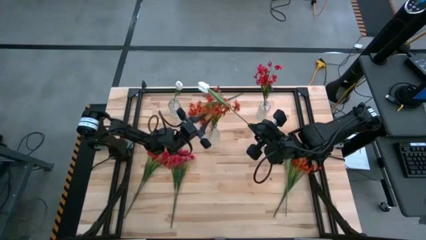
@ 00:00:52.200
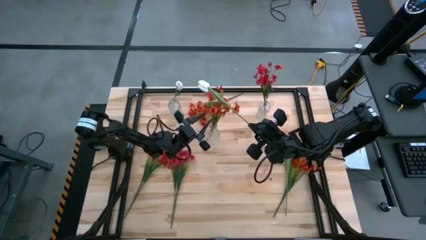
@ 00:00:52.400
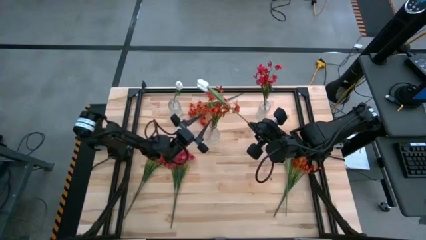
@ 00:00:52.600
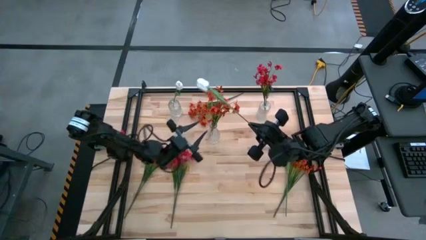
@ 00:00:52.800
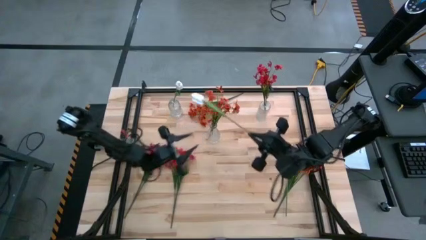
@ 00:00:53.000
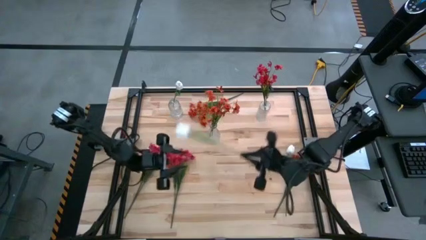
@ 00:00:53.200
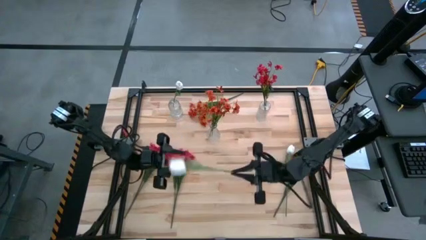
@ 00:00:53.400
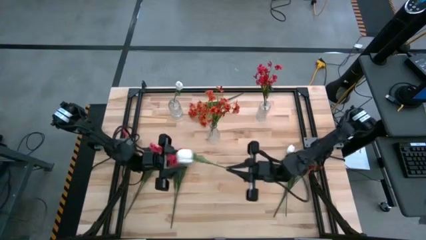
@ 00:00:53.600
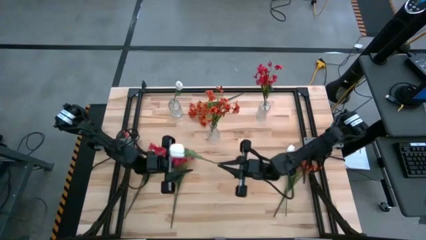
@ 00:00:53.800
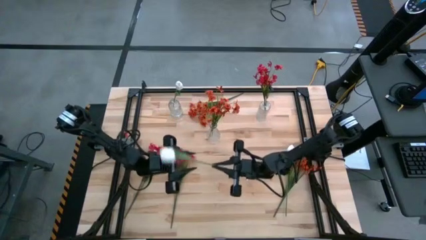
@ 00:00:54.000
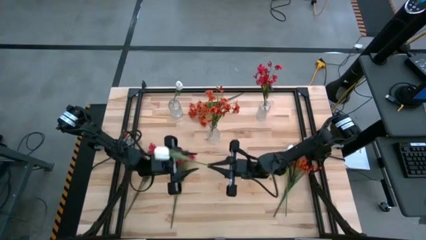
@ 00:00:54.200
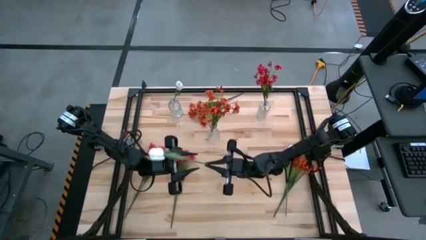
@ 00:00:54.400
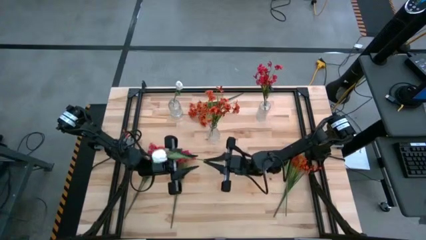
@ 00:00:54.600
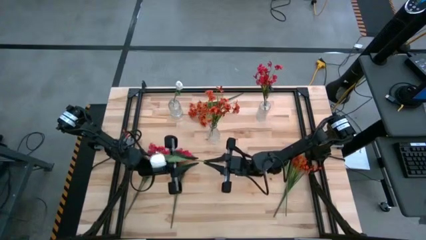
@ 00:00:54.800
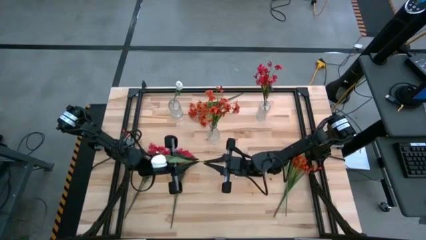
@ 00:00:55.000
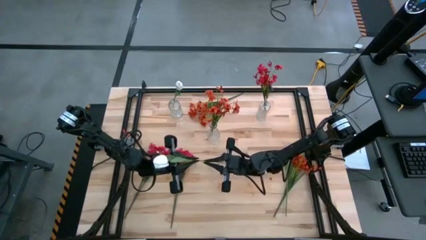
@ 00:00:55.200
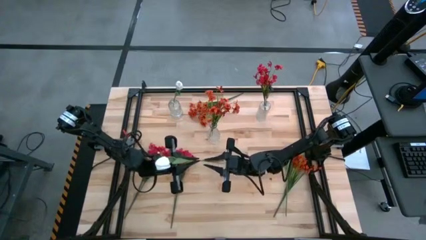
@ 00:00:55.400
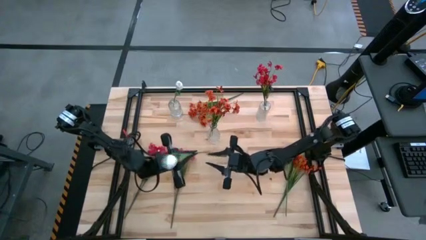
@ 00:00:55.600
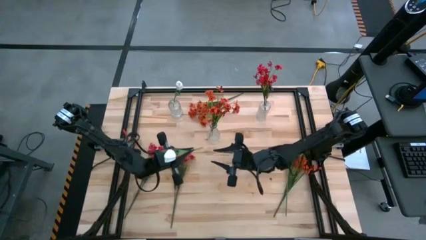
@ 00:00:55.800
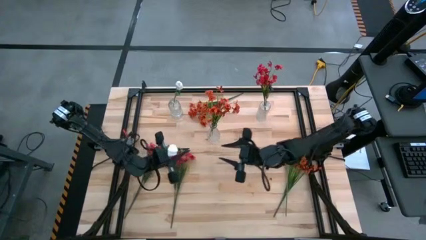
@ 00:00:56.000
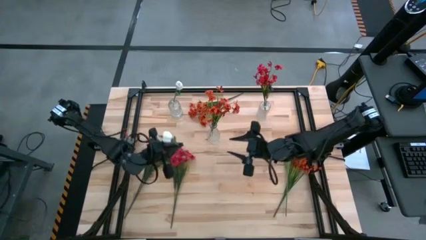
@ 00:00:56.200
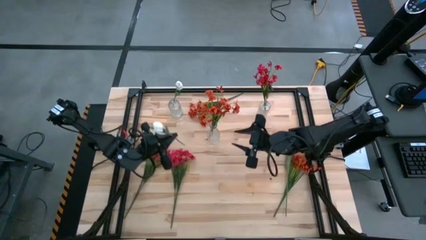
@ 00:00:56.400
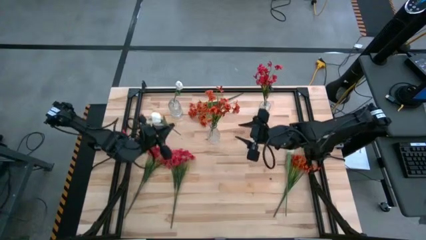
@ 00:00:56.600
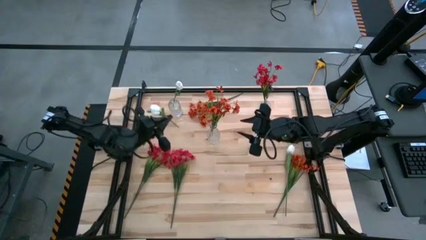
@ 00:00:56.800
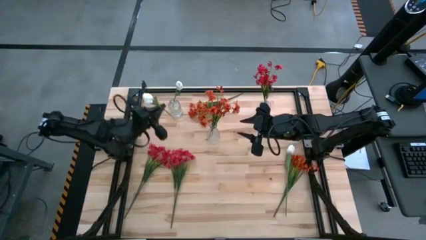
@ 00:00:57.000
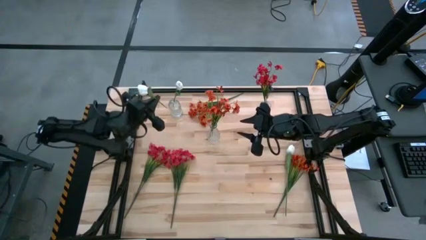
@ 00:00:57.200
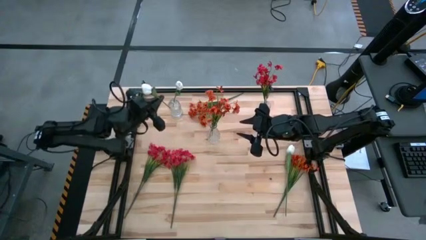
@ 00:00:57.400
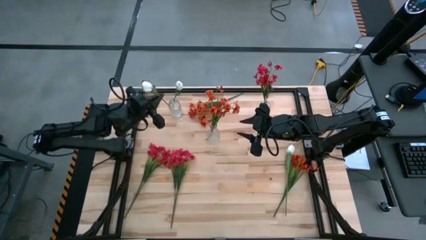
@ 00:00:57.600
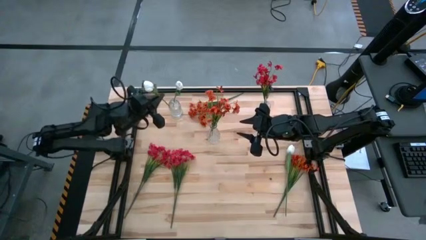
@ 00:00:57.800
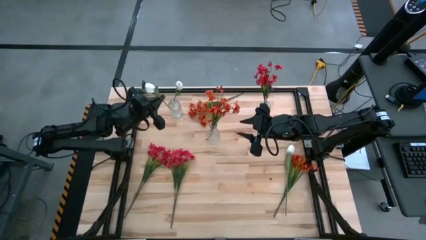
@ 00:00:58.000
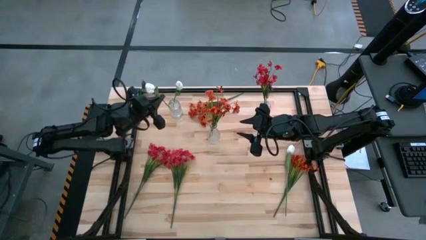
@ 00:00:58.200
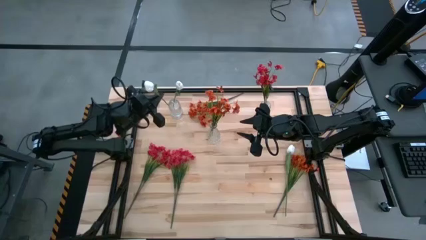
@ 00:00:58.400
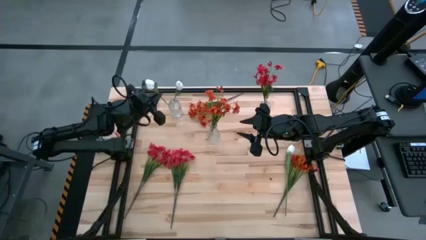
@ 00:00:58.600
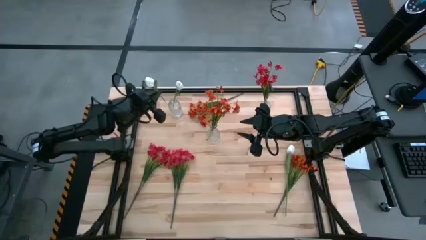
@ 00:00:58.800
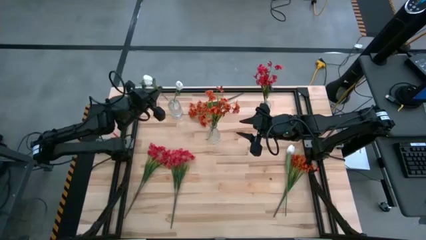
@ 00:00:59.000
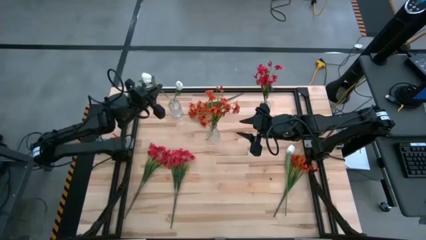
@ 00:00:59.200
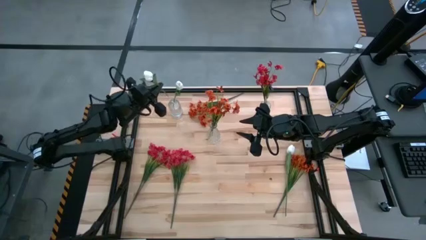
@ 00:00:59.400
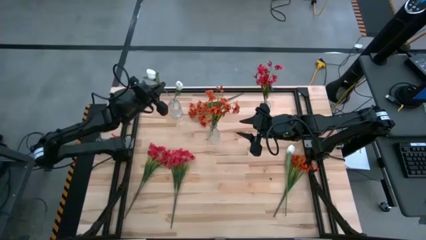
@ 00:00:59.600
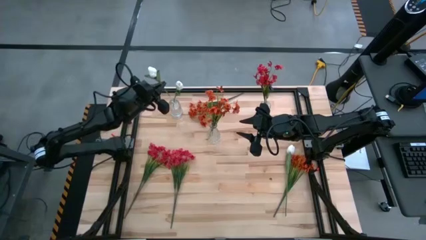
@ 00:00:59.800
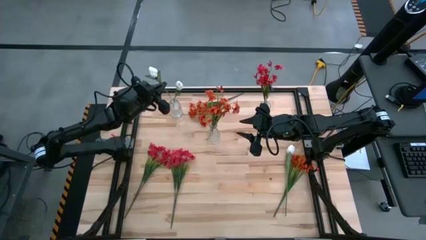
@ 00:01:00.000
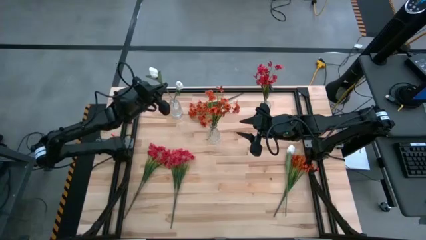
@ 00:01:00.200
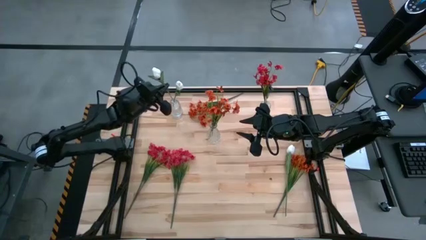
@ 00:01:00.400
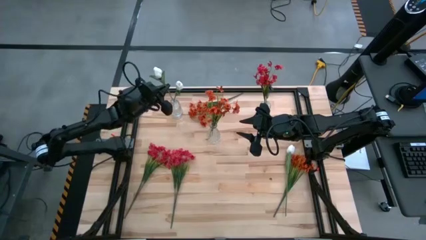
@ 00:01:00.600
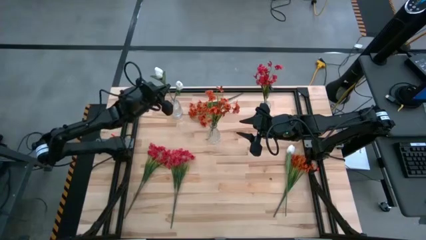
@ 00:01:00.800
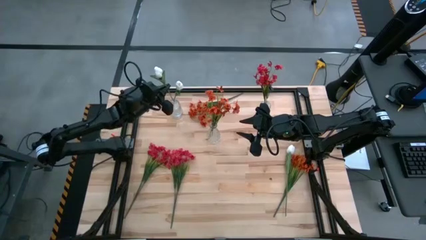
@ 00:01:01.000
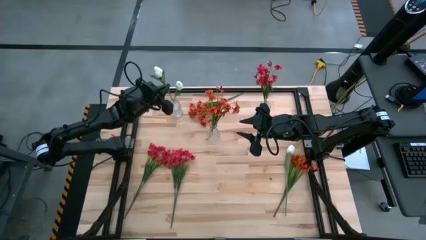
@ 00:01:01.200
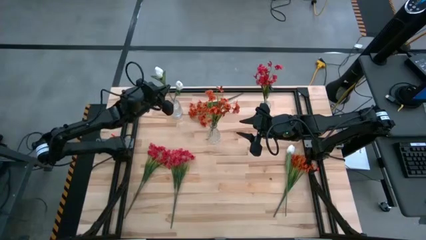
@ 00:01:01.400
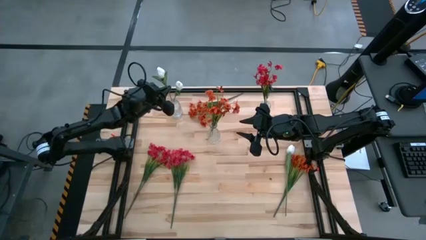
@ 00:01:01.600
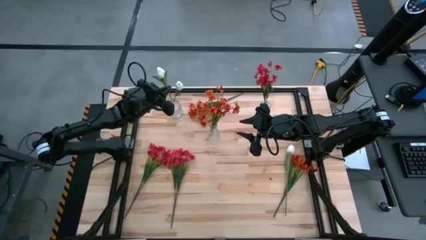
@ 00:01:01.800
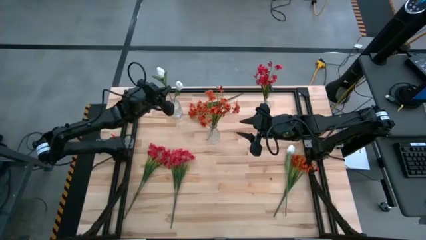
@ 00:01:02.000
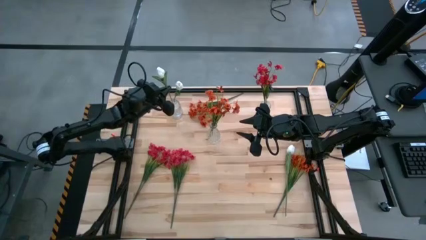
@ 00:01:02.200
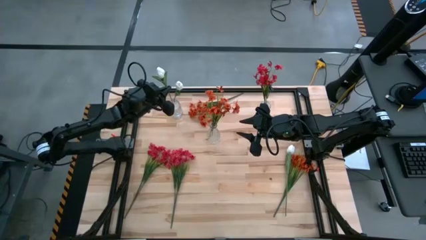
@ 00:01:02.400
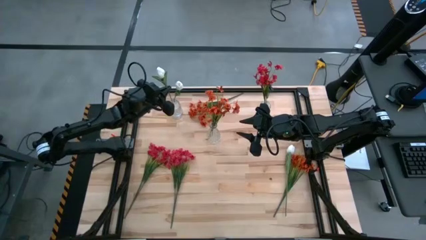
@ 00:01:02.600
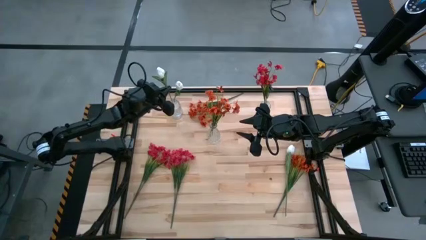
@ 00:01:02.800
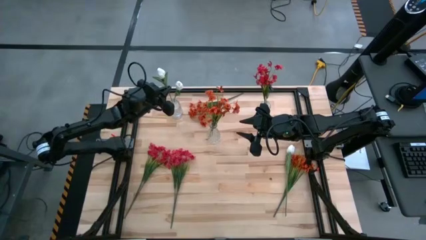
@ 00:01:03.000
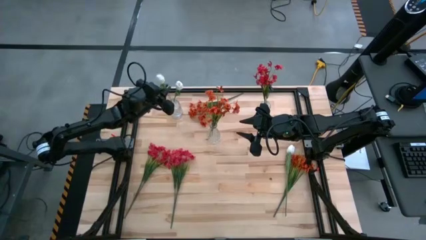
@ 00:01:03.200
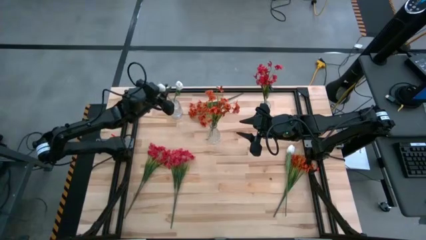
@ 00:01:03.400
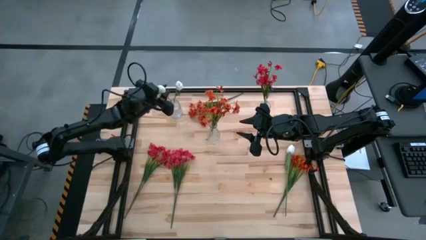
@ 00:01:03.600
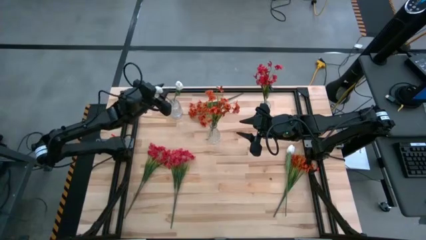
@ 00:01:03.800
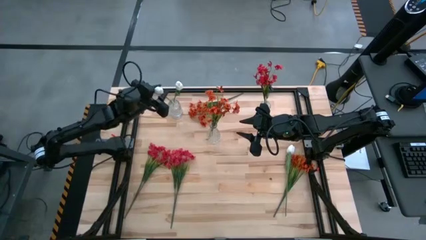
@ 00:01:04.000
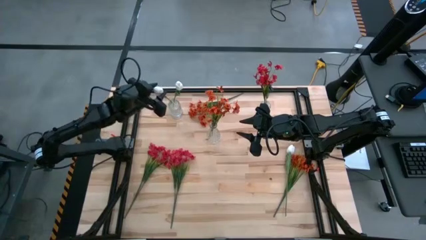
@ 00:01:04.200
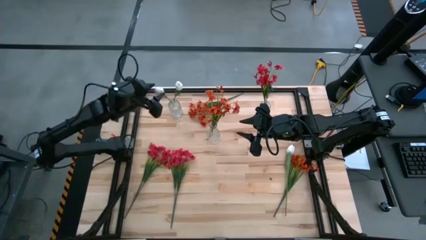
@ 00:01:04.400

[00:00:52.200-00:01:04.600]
Task: Sort flowers into vase by color
Put the top white tulip into the top left transparent vase

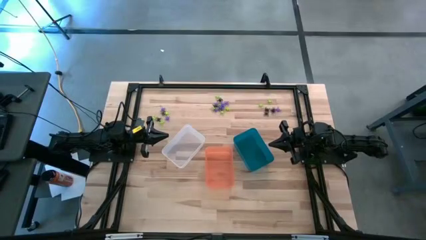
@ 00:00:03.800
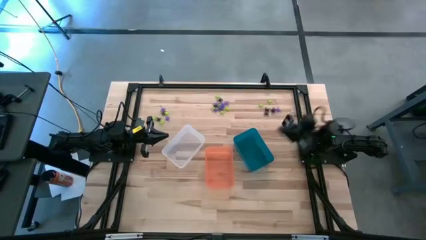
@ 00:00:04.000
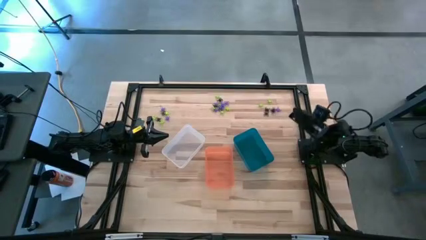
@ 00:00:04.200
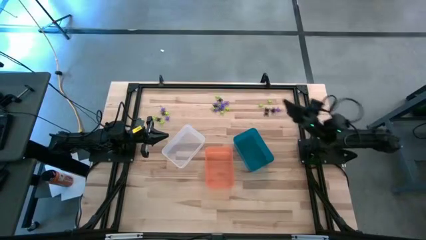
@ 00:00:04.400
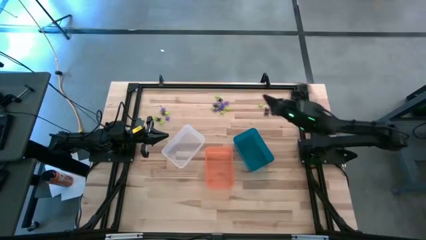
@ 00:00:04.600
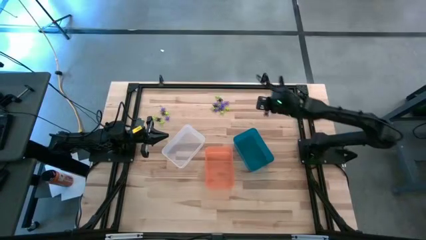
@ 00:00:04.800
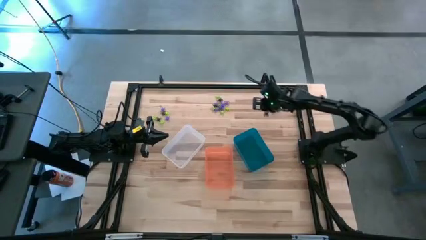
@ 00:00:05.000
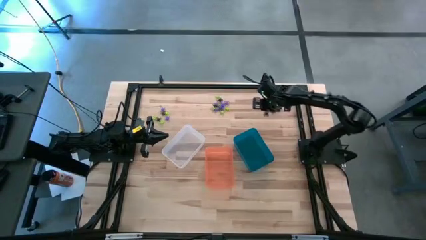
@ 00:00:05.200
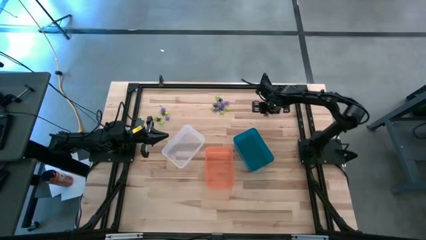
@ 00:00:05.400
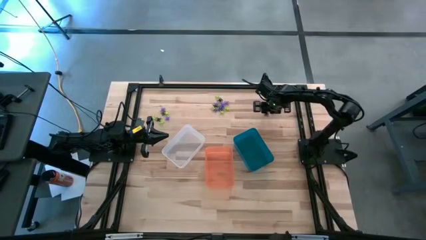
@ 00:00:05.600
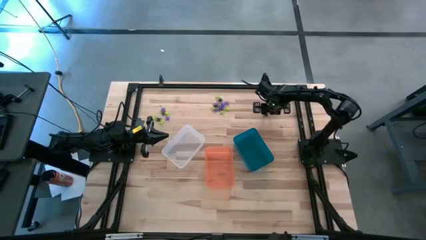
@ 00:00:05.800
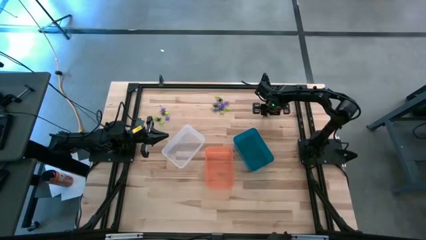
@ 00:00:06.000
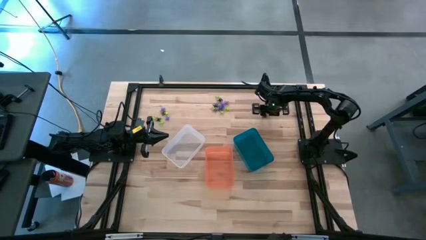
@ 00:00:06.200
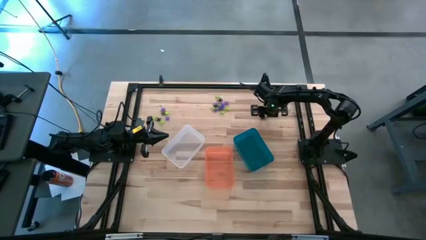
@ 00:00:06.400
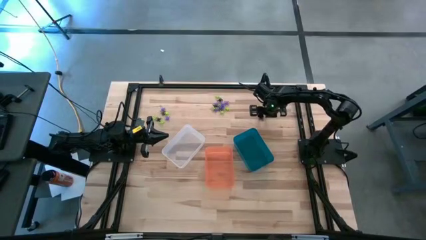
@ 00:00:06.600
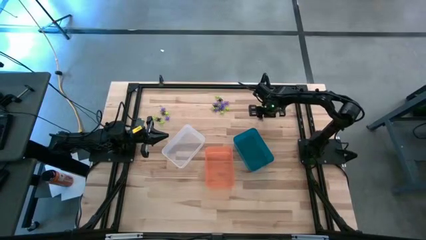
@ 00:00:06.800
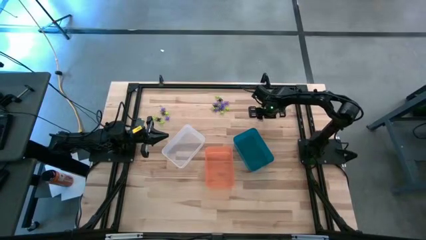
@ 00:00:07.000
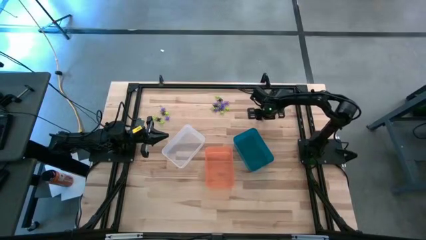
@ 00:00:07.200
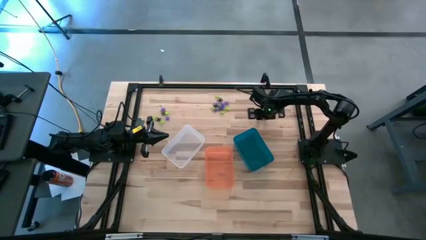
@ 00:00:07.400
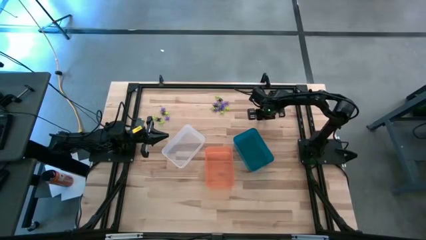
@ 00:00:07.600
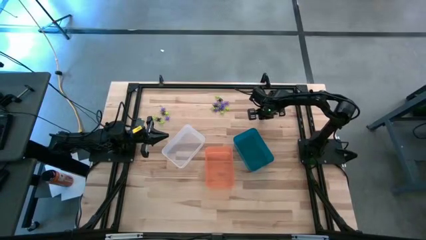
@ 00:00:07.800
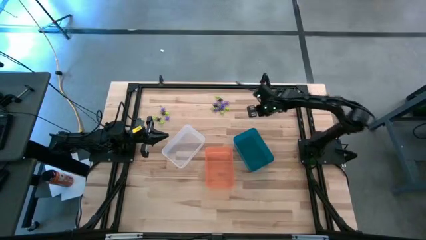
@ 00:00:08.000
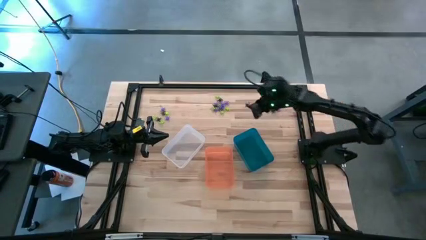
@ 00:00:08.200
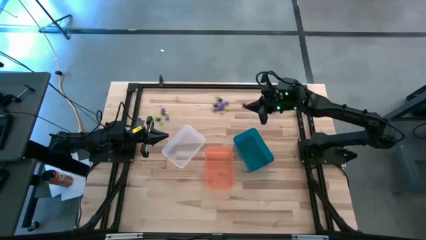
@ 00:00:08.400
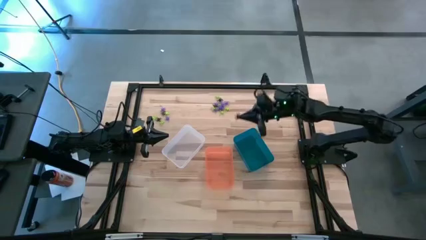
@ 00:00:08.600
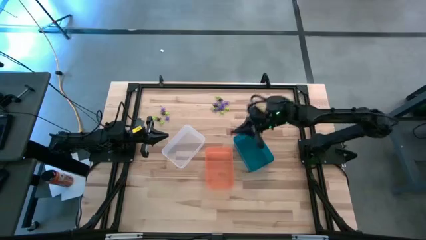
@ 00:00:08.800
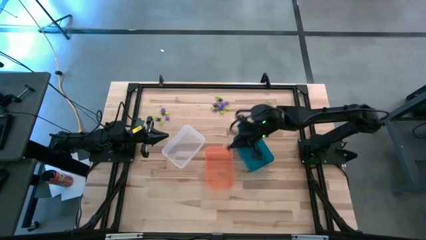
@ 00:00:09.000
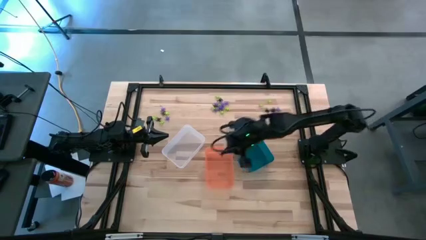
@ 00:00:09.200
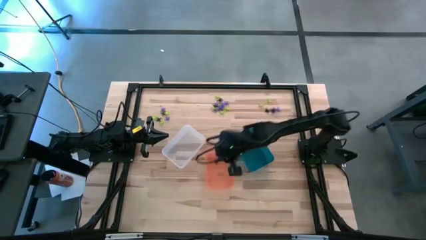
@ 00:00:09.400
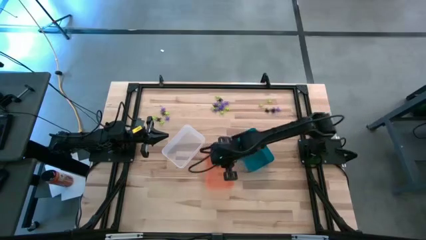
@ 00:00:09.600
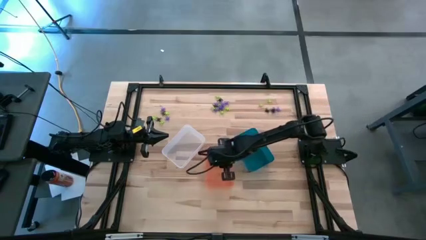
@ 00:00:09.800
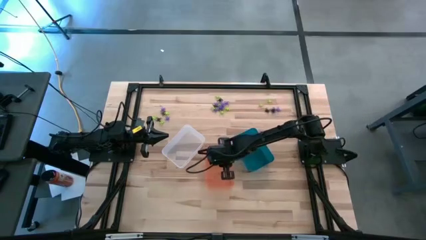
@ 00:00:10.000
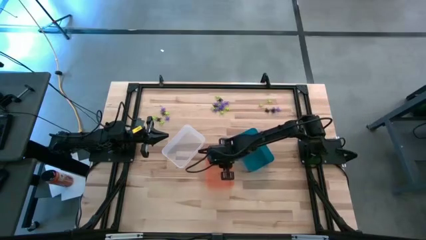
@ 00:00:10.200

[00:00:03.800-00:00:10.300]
Task: Sort Halloween decoration
Put the black spider toy into the orange bin
